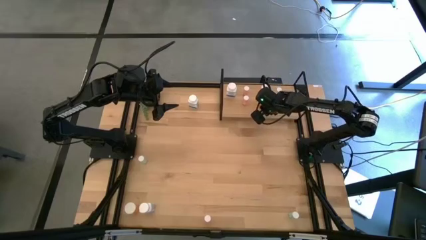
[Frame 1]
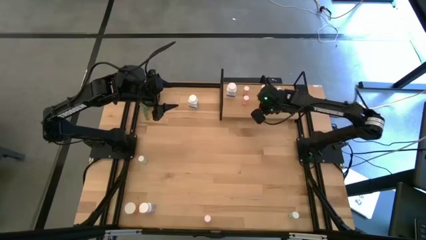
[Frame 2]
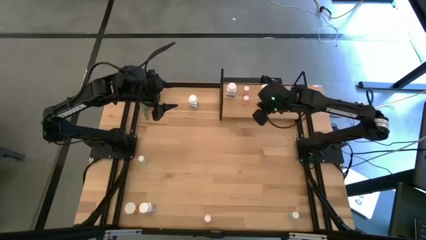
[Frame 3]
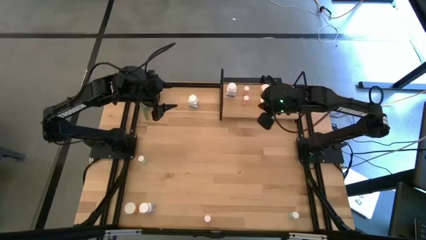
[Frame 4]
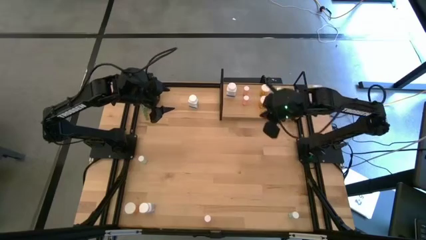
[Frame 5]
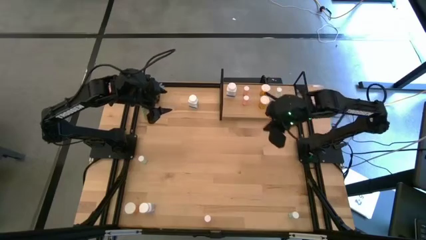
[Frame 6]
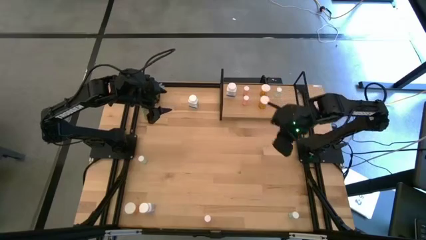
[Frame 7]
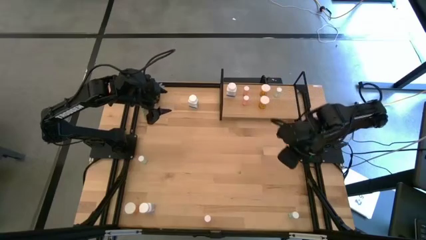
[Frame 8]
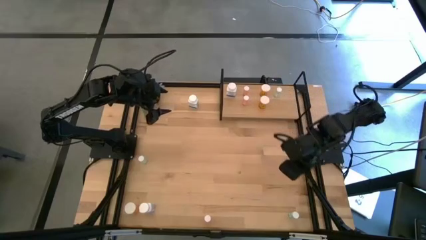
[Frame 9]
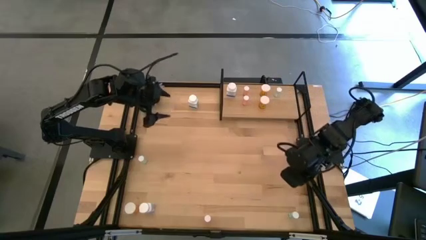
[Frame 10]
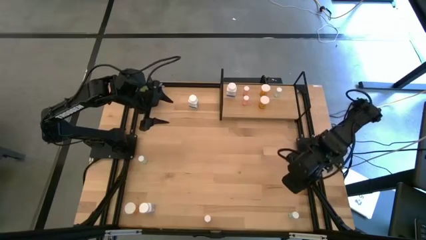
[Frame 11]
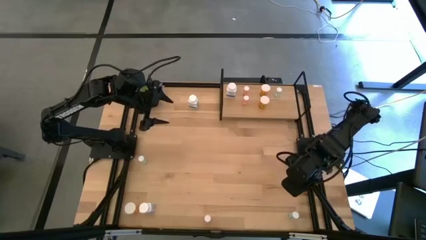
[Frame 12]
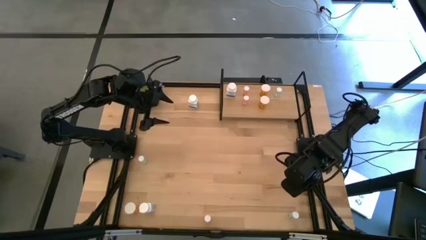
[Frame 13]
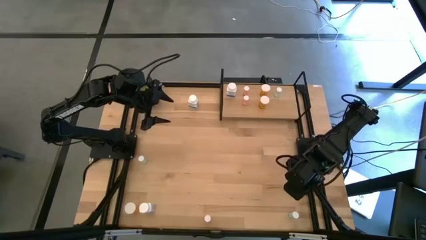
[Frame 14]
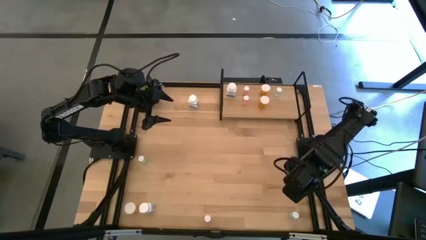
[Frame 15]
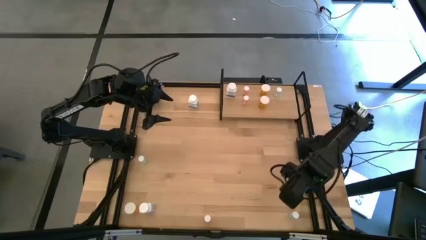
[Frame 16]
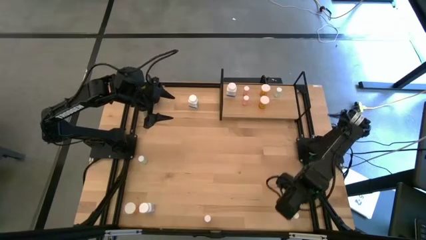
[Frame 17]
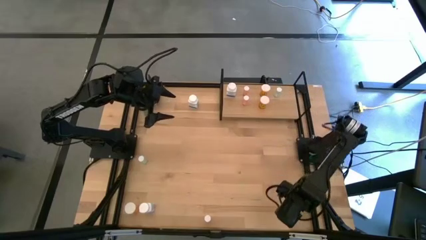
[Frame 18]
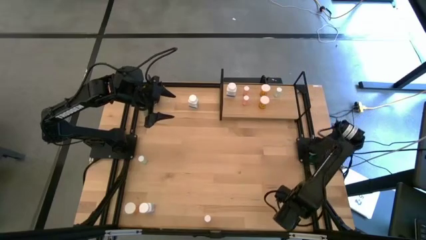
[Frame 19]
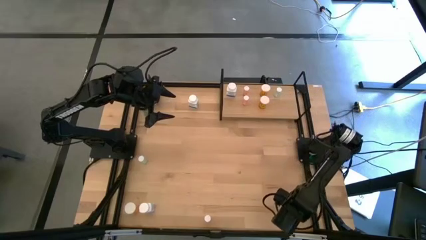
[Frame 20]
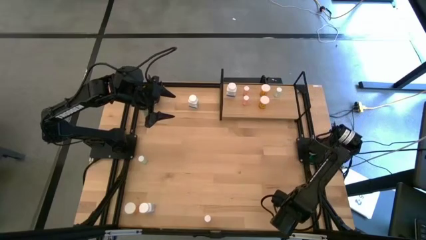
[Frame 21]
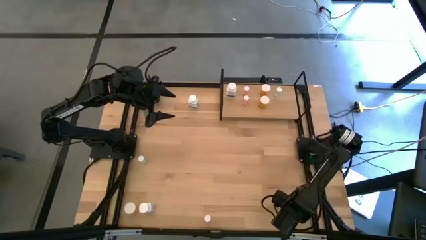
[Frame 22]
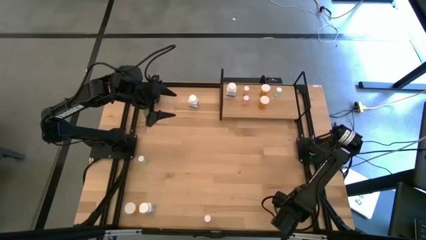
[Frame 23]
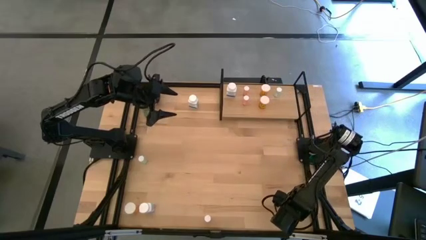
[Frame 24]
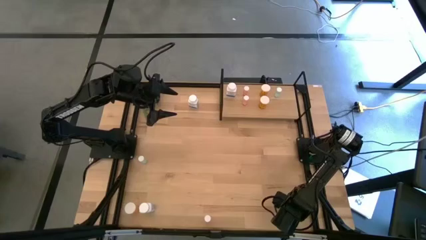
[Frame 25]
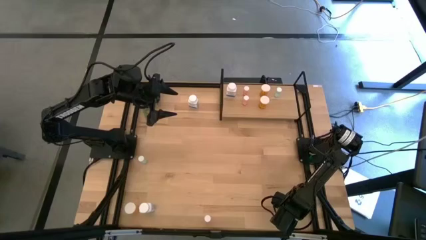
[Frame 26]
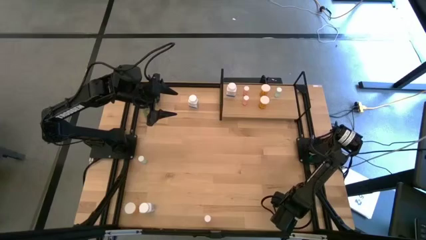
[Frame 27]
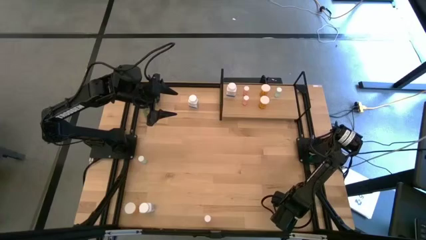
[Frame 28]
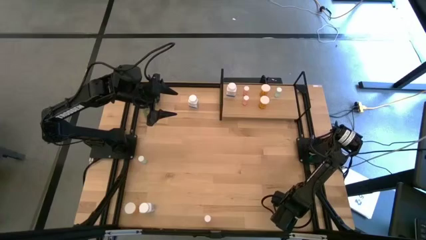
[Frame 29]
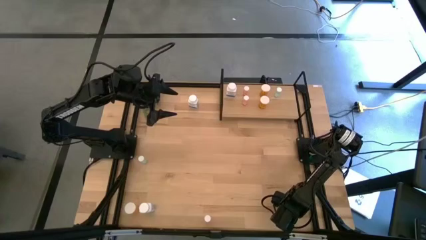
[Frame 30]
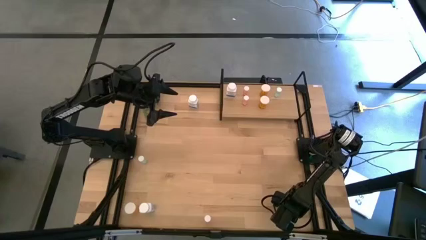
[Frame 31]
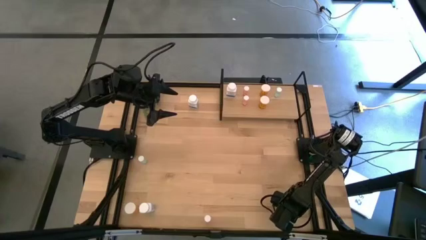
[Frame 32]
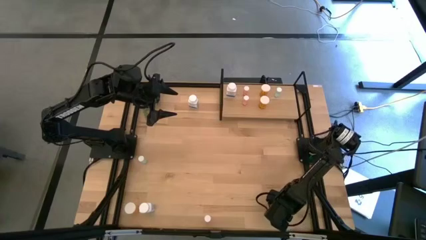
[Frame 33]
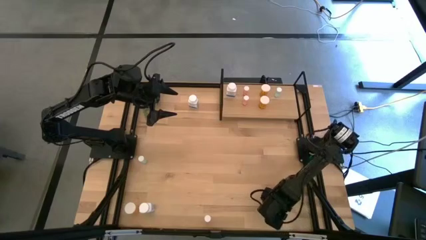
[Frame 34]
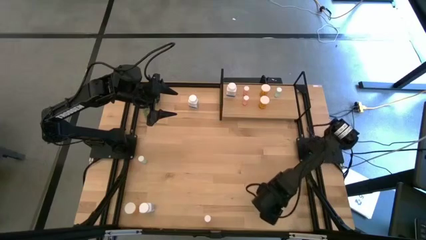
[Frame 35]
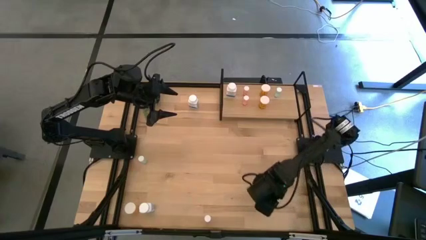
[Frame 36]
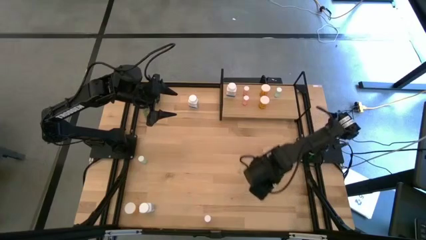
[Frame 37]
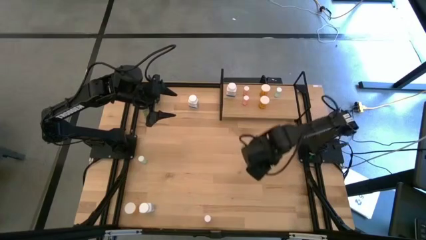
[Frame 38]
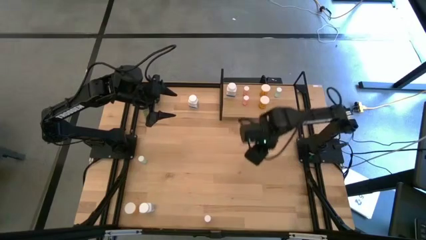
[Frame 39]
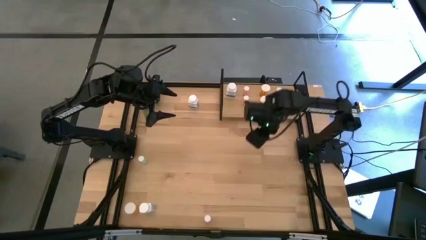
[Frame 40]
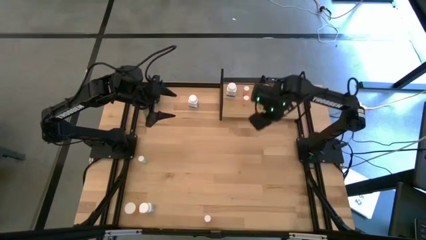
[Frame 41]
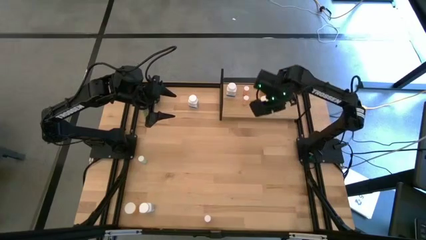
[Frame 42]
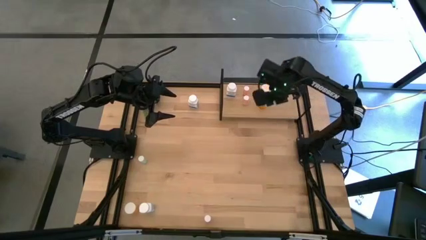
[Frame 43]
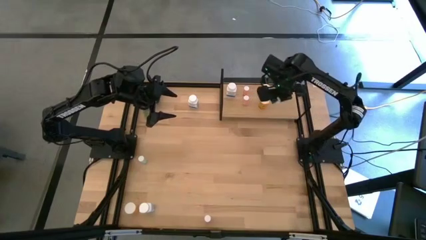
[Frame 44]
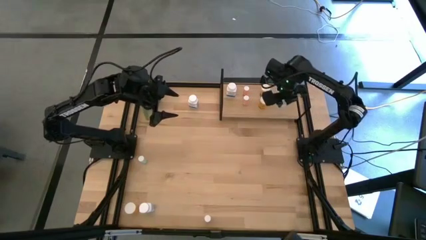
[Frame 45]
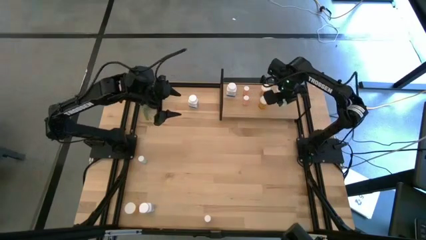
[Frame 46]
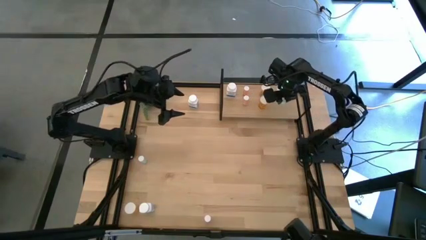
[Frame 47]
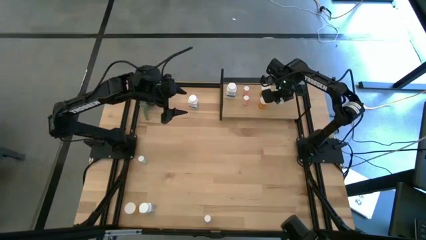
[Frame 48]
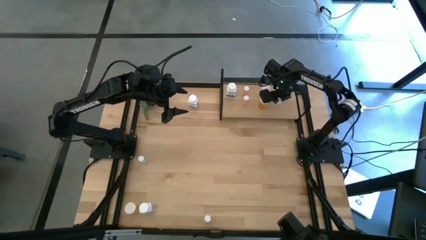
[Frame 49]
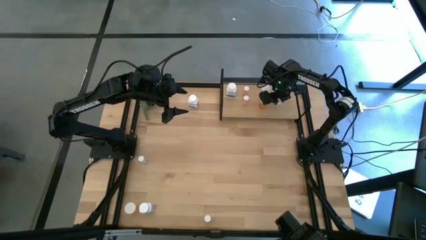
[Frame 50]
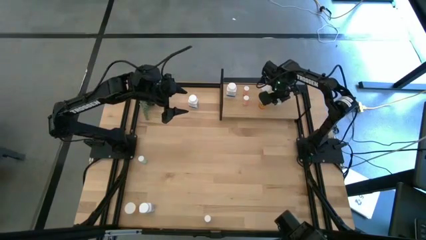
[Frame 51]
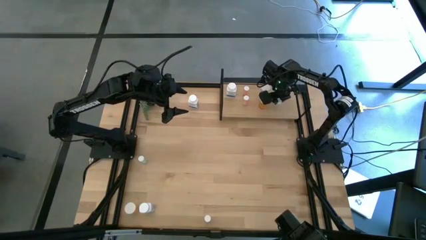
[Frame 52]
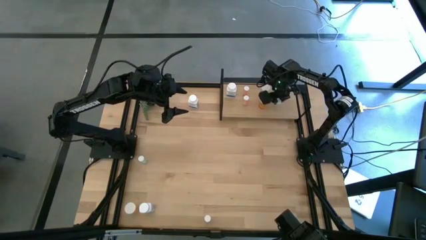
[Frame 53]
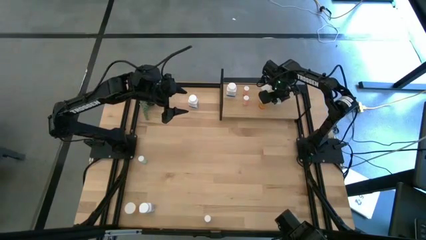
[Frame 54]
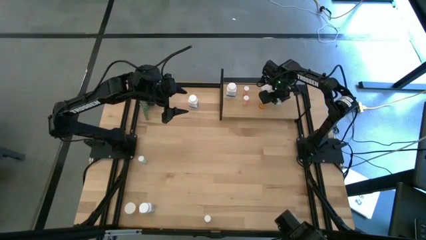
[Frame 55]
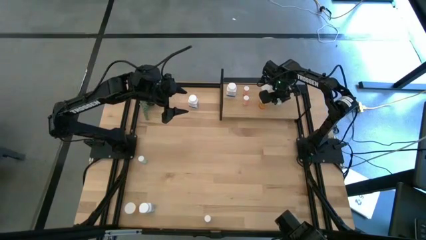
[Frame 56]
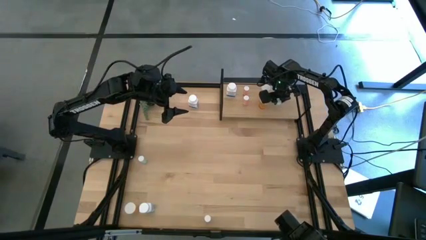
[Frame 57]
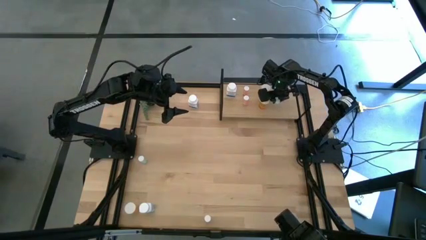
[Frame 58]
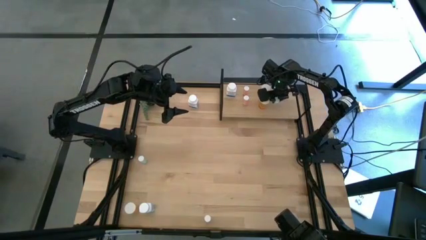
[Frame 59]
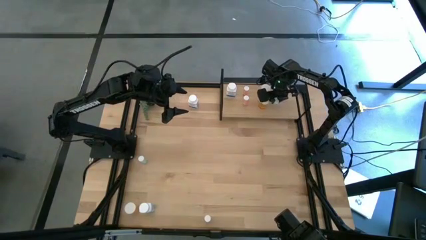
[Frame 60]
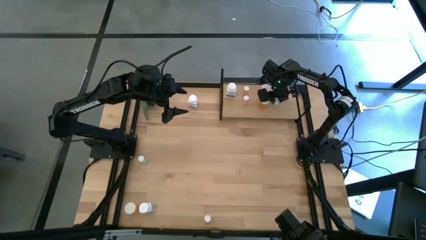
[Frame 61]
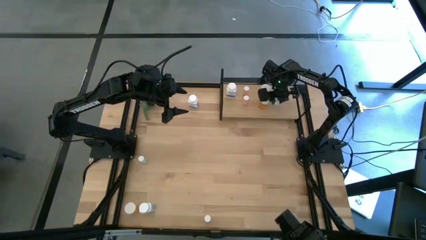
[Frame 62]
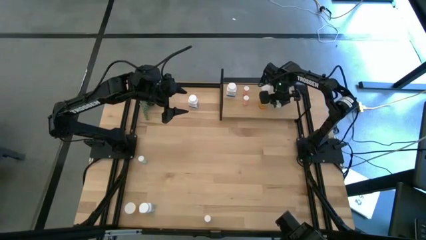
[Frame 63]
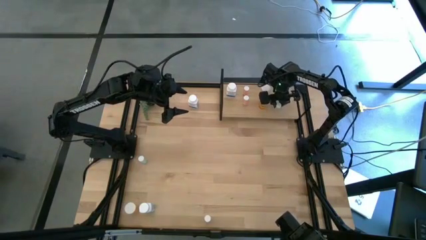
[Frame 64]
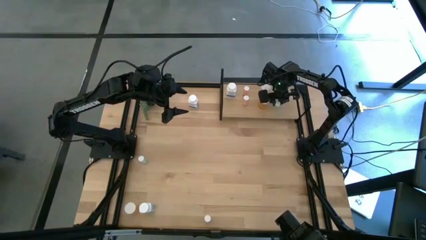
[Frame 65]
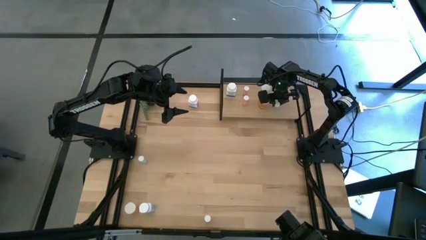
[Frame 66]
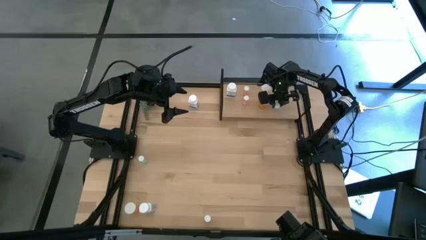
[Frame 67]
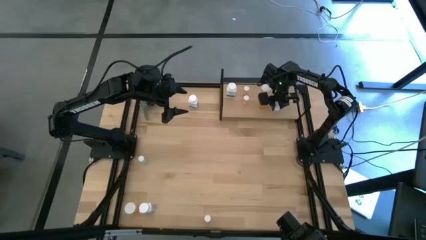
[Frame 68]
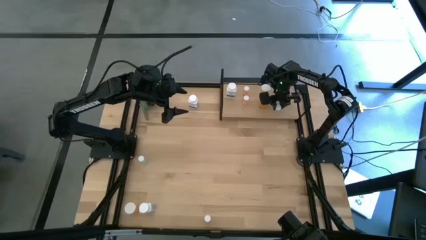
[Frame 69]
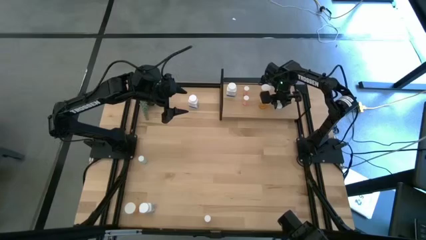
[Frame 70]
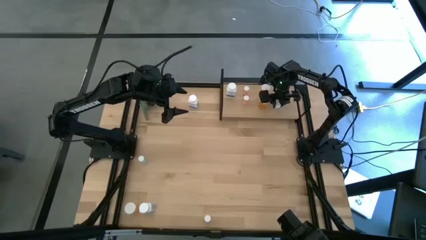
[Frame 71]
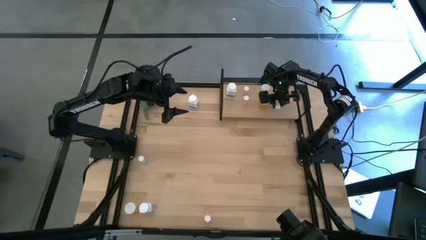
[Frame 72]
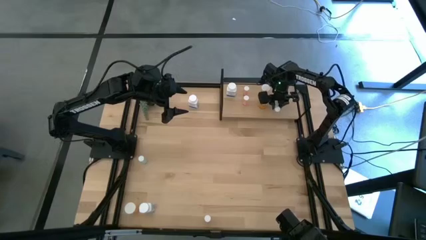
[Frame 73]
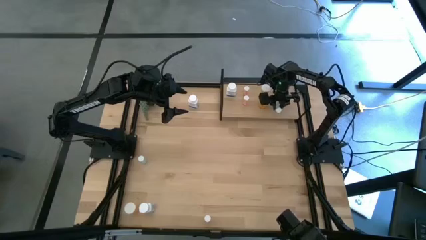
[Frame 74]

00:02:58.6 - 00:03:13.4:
Task: Pick and place medicine bottles onto shelf by color
Put the right blue pill bottle on the shelf aligned with the other blue pill bottle
